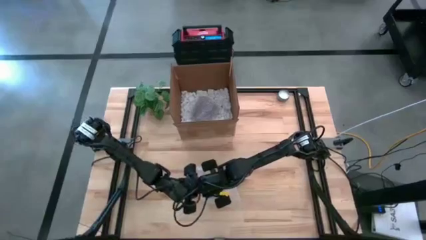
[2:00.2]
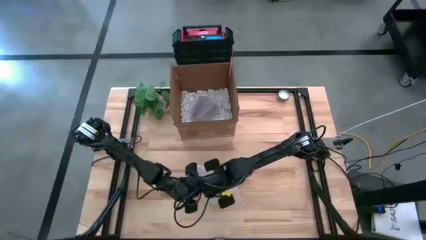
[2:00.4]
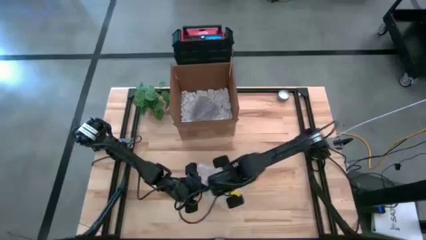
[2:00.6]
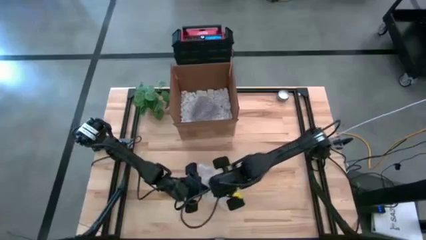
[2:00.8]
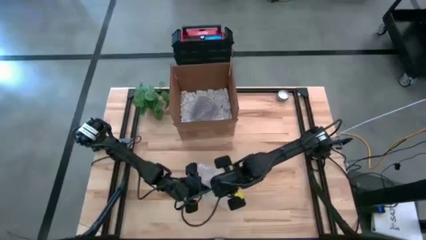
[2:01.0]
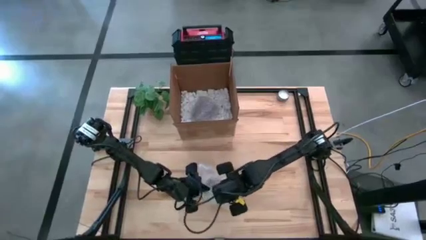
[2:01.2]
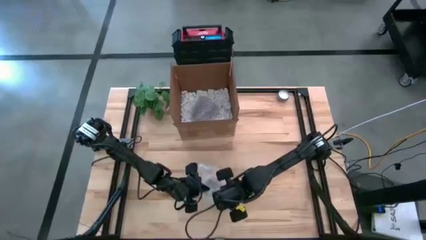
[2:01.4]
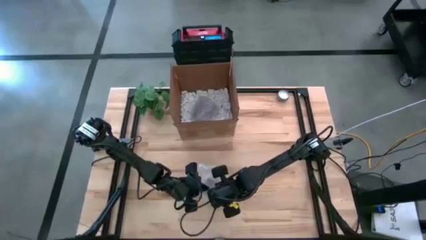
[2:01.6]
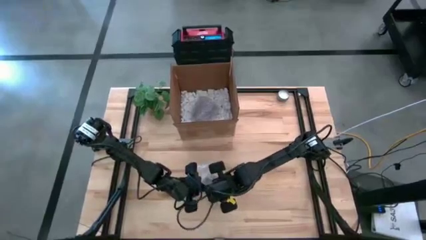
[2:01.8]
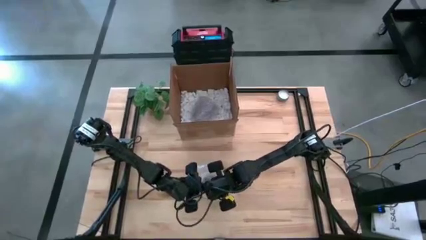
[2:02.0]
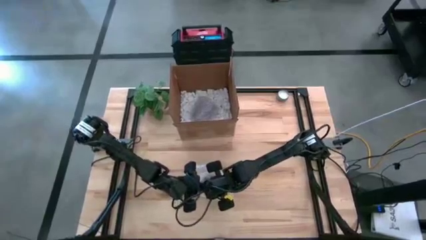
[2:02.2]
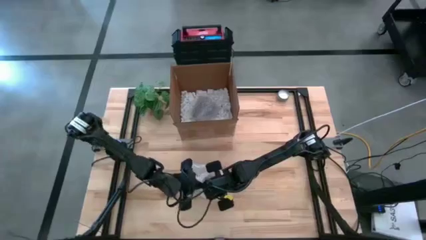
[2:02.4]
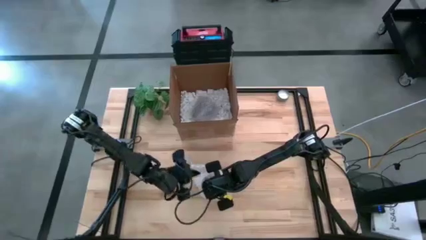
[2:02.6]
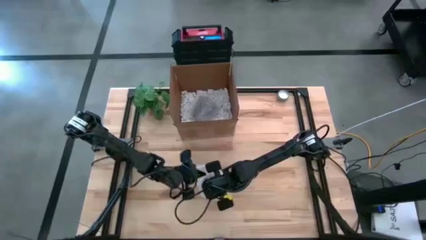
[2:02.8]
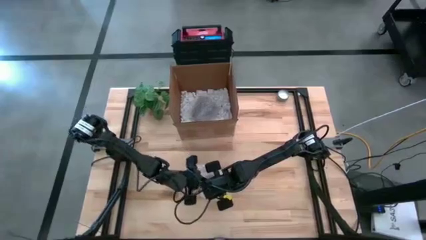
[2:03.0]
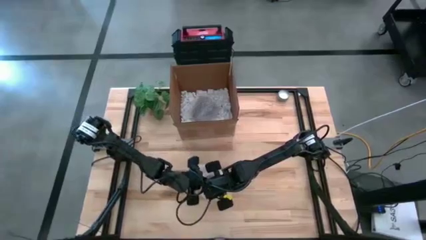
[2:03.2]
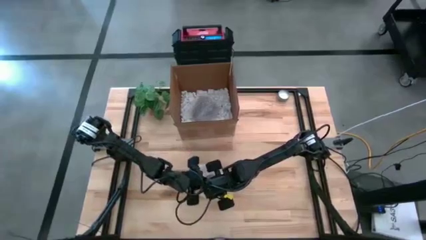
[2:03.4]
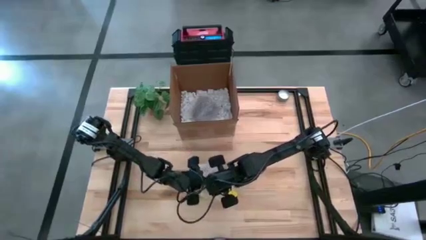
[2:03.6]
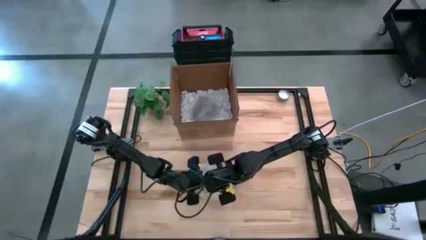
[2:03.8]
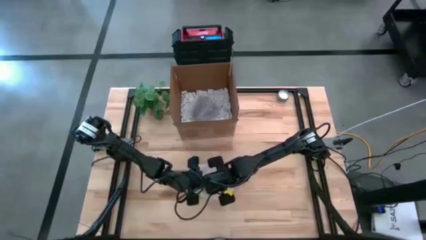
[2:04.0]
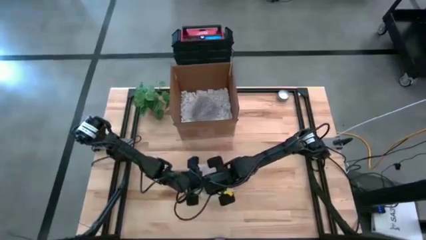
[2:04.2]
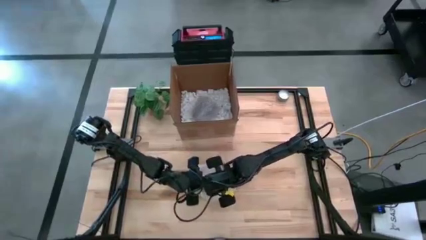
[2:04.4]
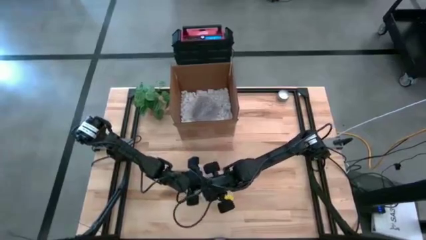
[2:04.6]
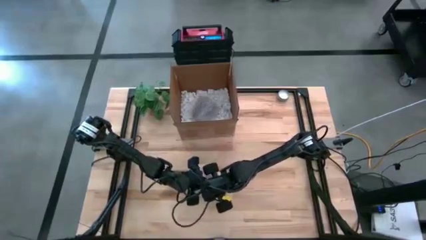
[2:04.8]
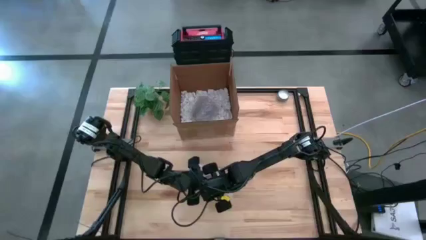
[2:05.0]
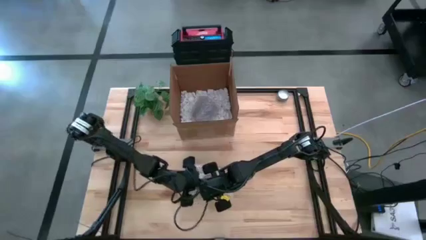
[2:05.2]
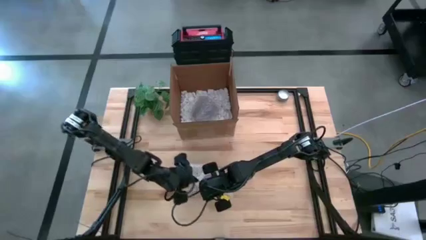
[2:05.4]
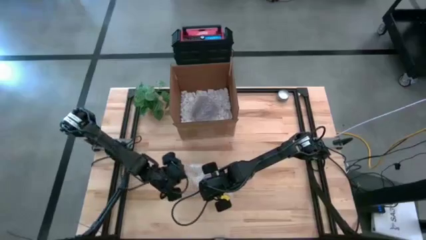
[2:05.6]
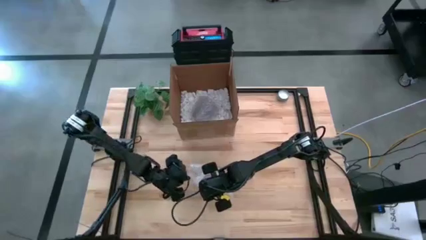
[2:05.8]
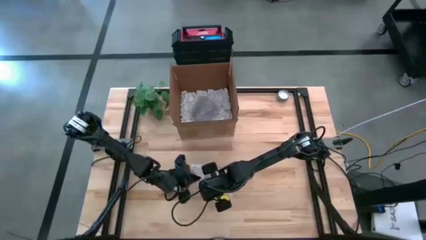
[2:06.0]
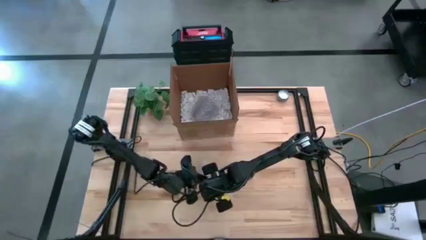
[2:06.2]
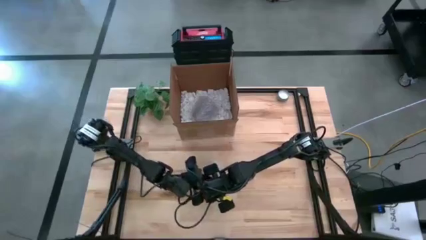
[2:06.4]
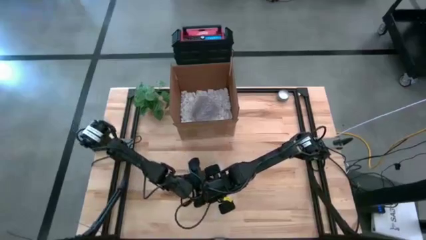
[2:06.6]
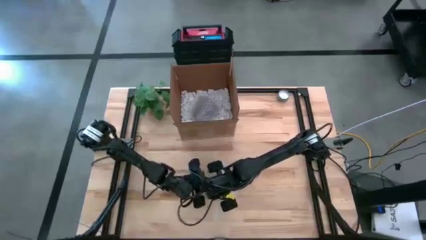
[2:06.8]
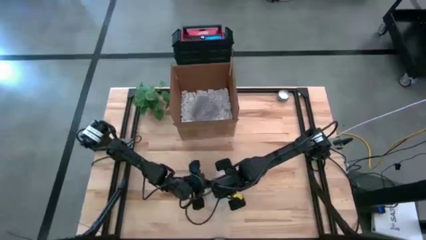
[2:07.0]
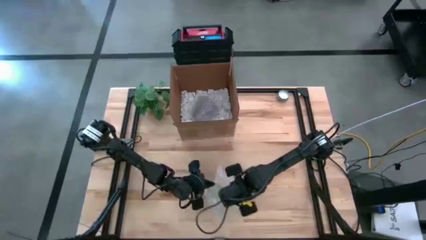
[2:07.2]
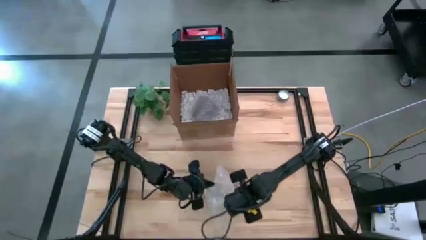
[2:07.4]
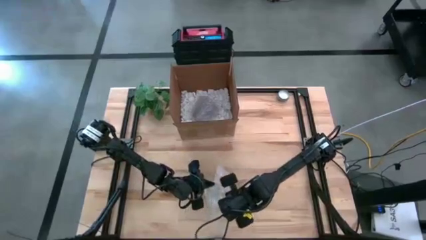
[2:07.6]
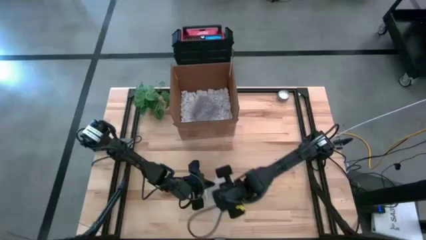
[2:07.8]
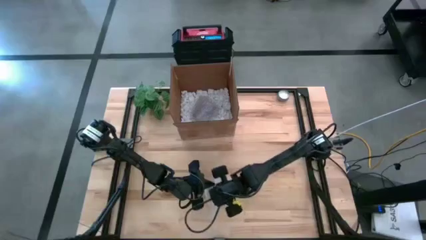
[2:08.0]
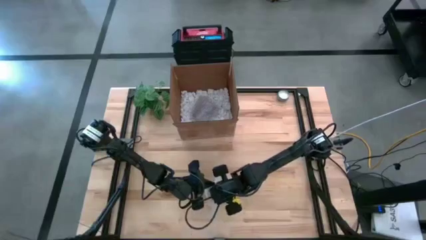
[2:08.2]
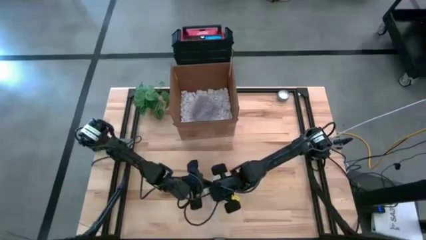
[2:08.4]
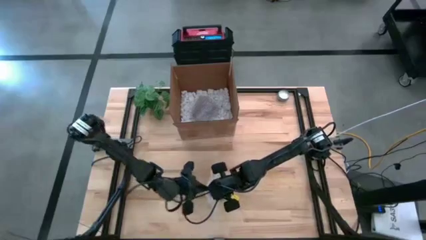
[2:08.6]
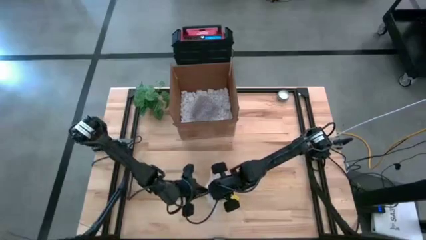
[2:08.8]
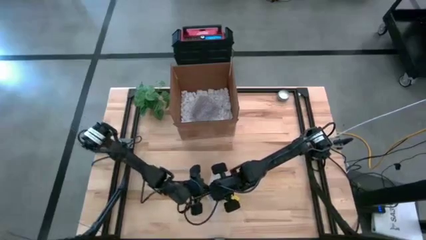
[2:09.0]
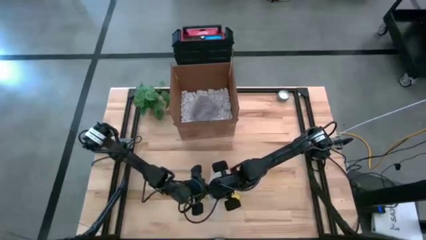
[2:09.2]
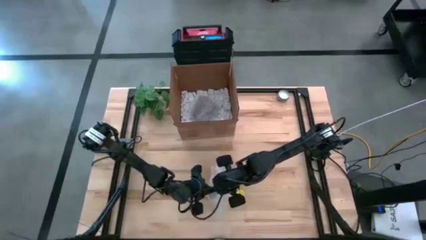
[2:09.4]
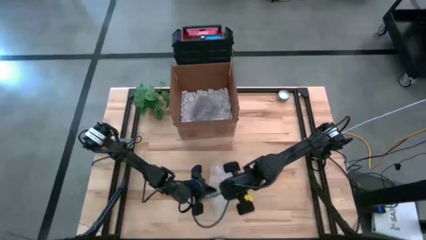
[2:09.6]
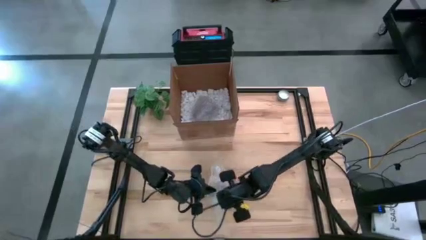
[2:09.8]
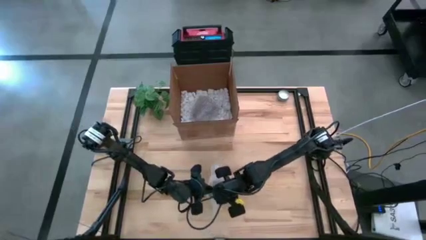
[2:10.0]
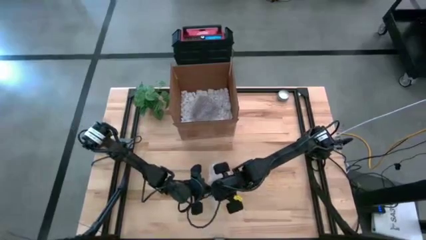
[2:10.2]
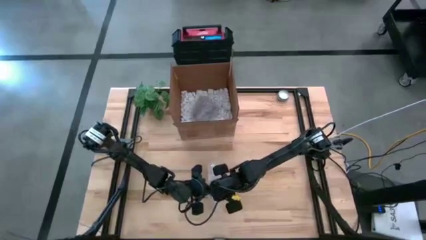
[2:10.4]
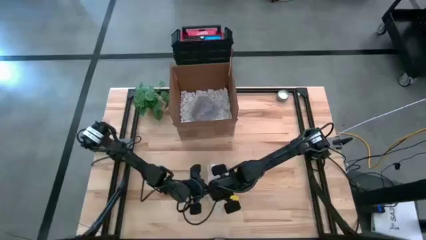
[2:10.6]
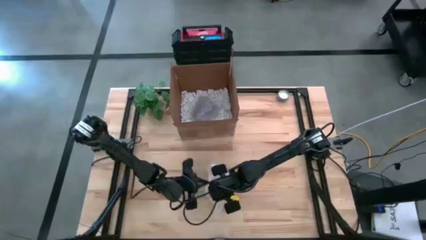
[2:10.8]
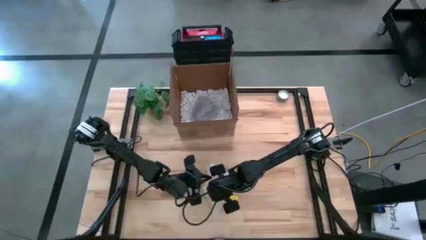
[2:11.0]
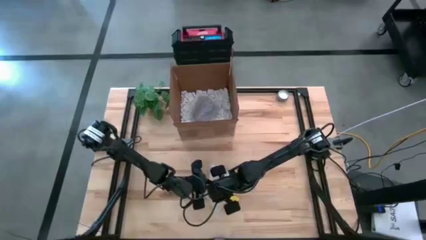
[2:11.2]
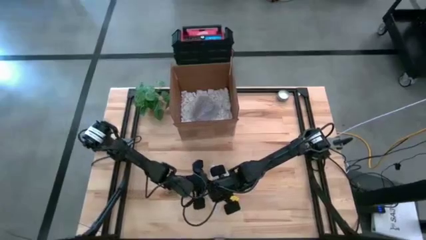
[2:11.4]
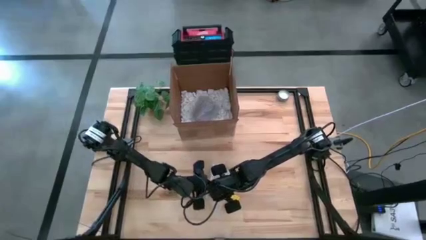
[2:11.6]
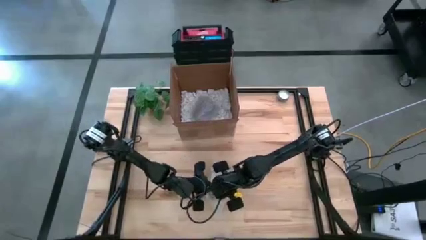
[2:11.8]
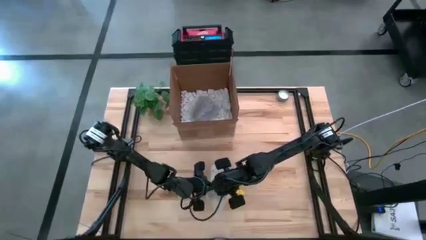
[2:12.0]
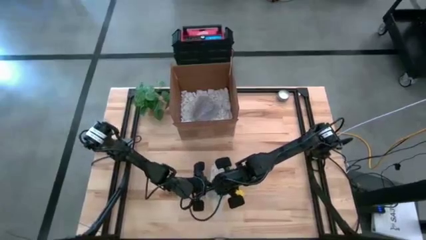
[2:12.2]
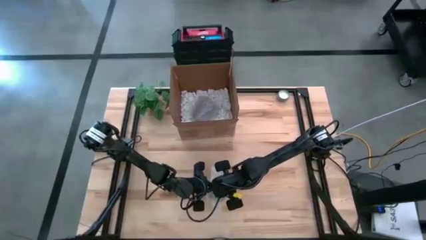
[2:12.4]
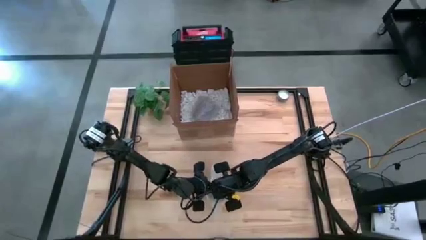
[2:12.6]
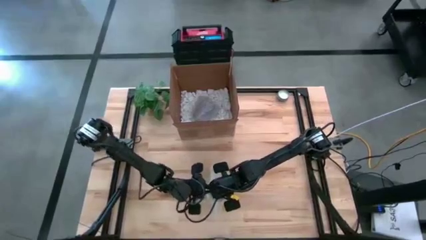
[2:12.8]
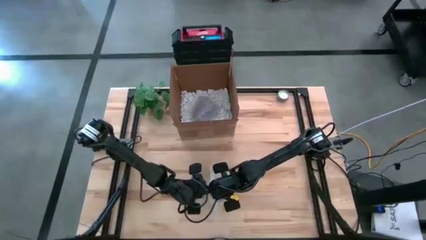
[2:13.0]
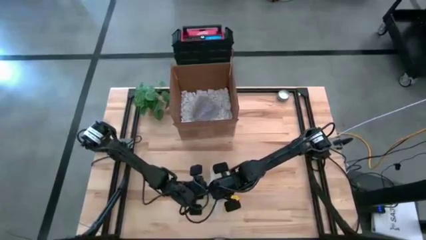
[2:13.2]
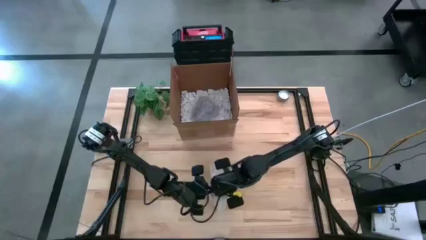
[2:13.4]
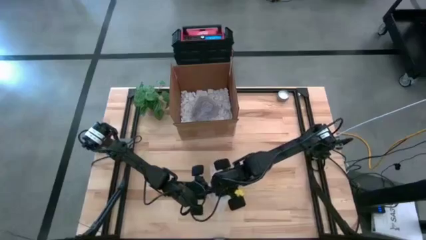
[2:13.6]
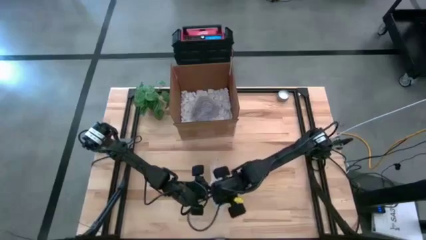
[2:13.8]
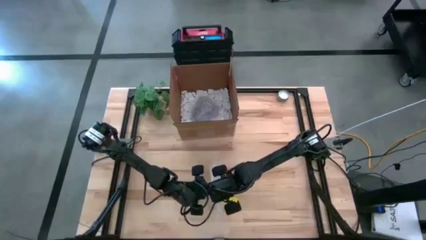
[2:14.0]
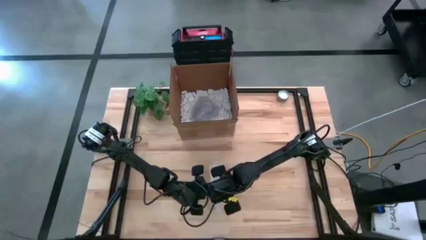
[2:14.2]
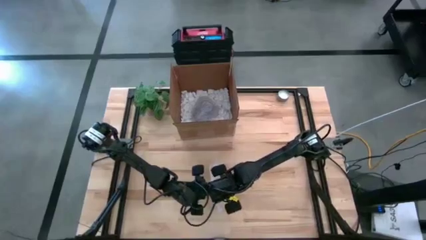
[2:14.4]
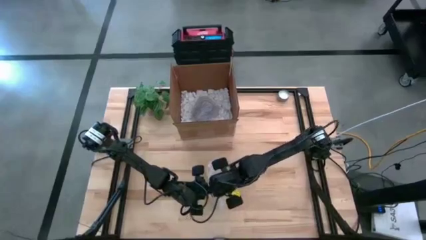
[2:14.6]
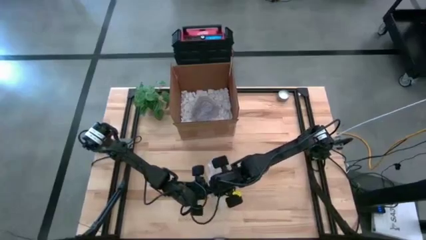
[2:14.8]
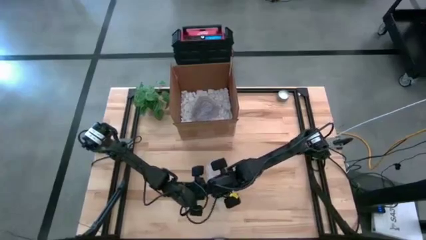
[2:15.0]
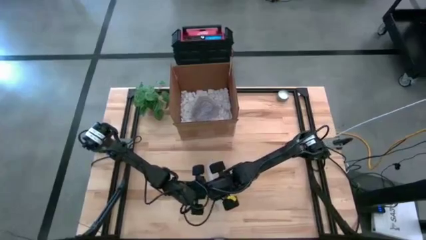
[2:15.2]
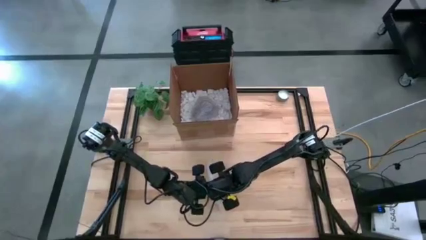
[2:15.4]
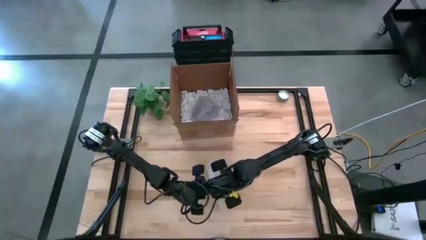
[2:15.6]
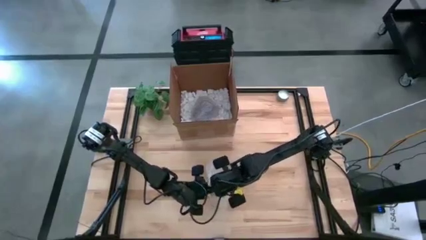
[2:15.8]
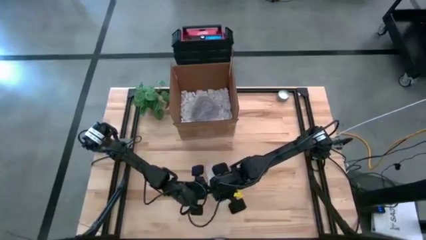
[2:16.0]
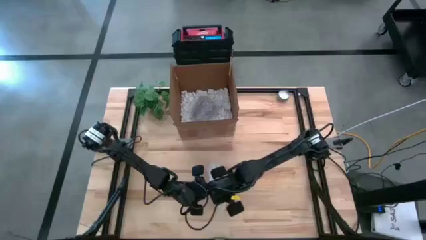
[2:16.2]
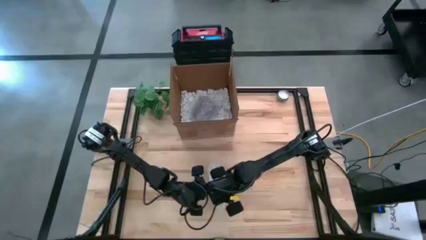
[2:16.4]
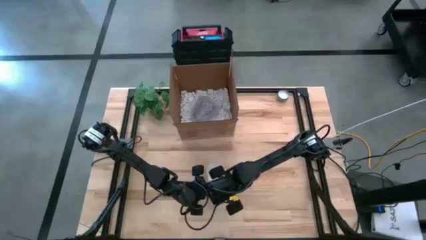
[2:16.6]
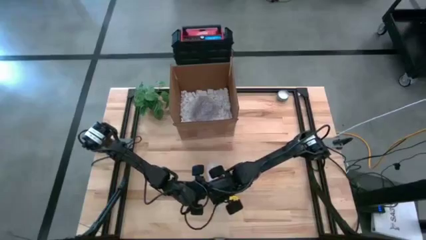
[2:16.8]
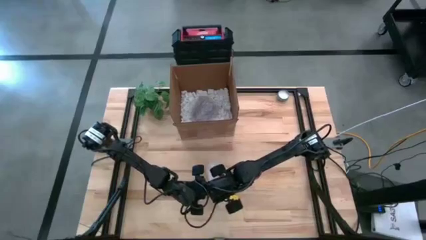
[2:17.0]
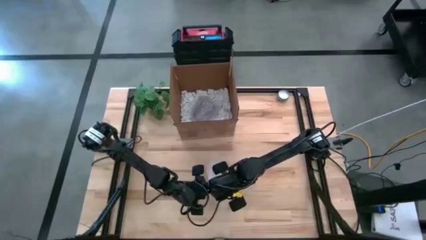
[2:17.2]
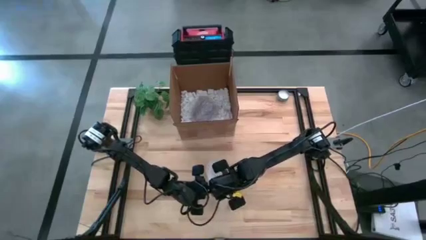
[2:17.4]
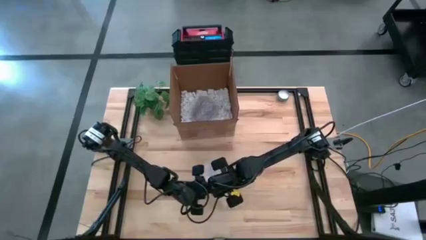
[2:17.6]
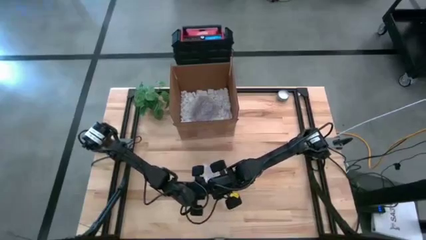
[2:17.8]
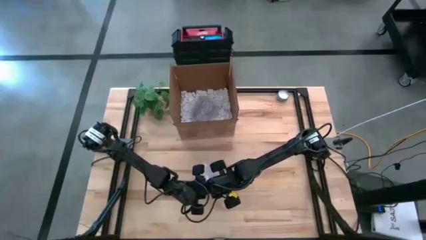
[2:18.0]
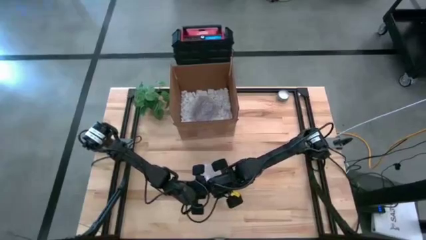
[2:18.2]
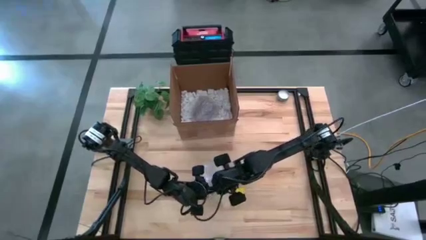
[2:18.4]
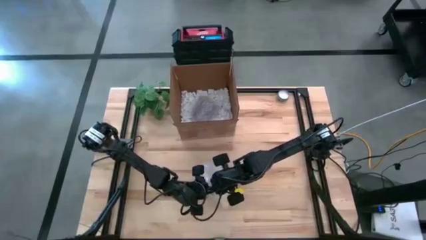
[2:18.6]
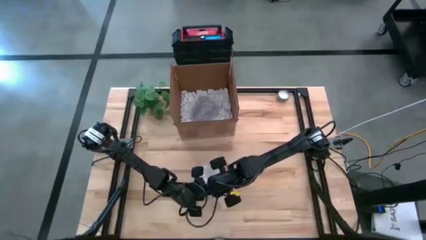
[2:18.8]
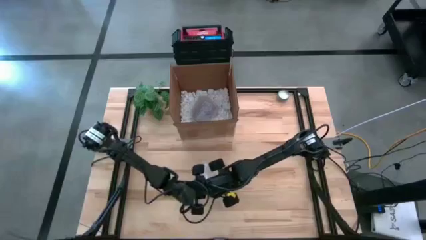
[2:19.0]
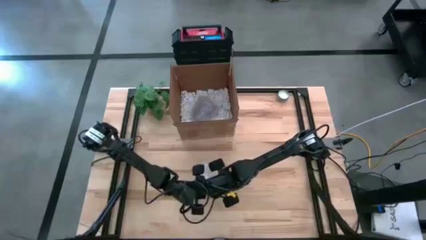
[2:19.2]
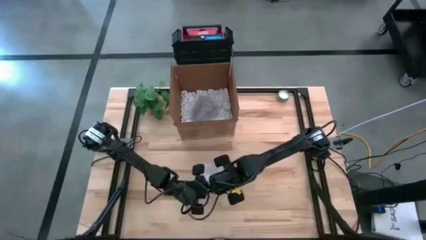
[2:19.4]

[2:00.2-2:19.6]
Task: wrap mug
Wrap the yellow mug using the bubble wrap
